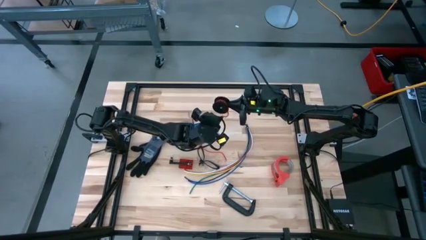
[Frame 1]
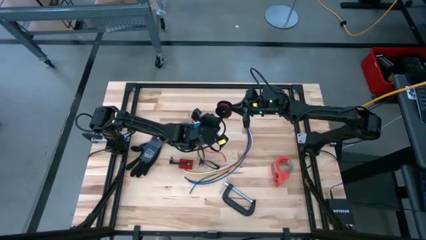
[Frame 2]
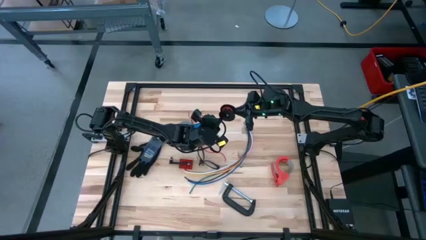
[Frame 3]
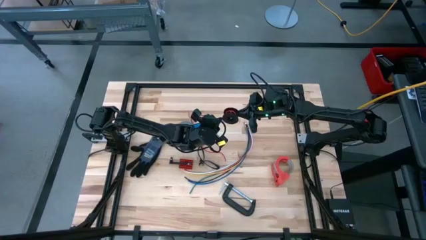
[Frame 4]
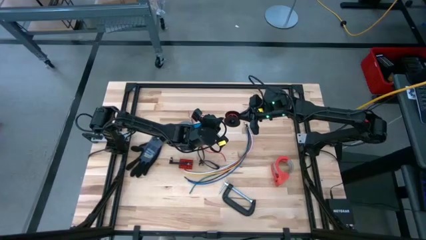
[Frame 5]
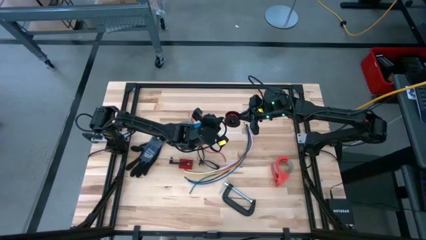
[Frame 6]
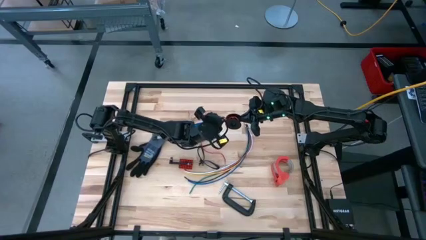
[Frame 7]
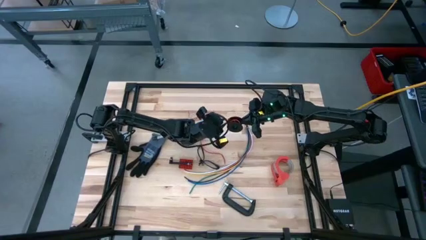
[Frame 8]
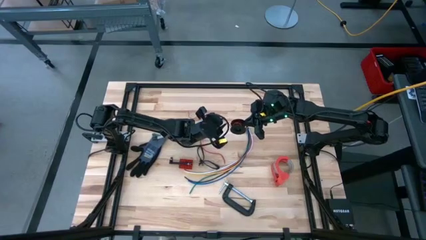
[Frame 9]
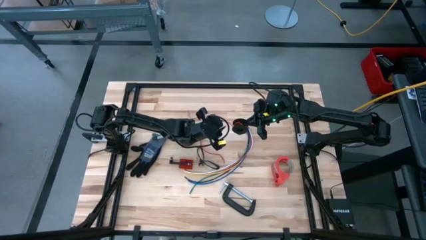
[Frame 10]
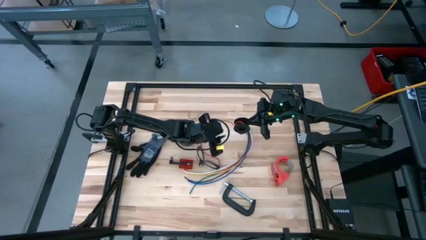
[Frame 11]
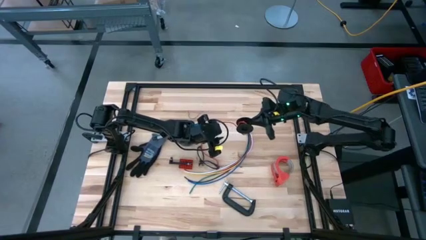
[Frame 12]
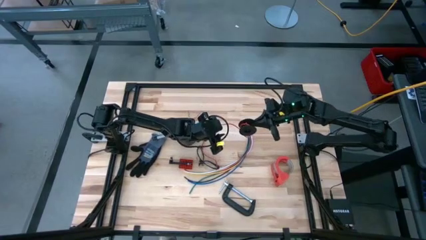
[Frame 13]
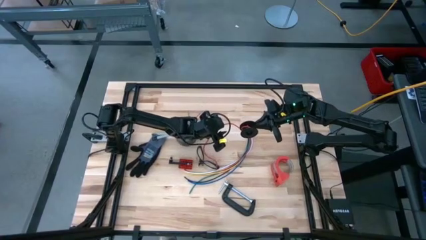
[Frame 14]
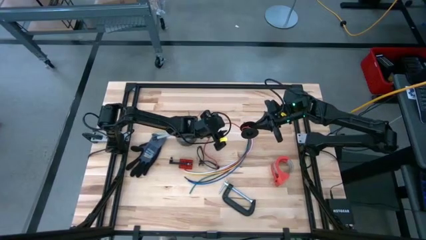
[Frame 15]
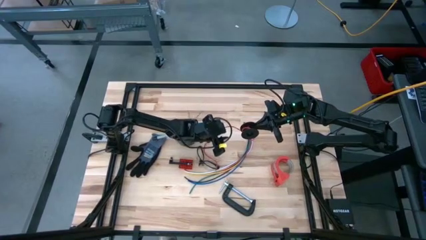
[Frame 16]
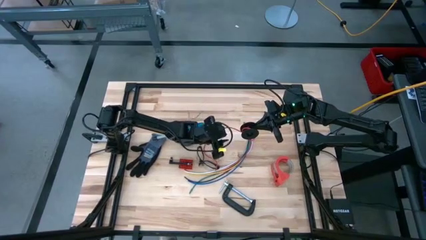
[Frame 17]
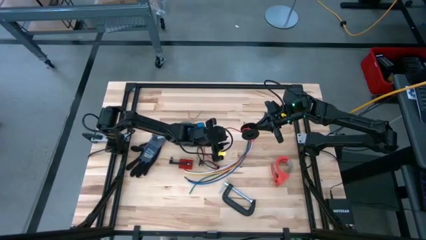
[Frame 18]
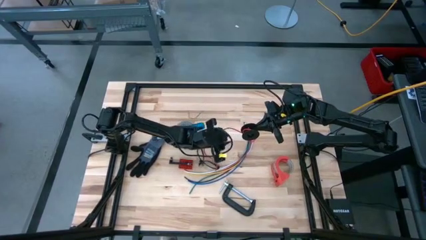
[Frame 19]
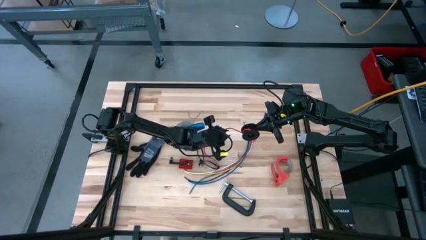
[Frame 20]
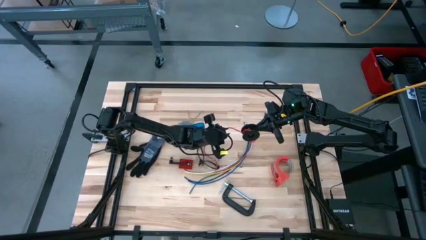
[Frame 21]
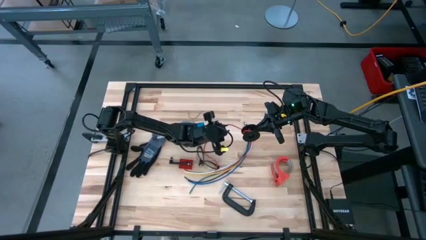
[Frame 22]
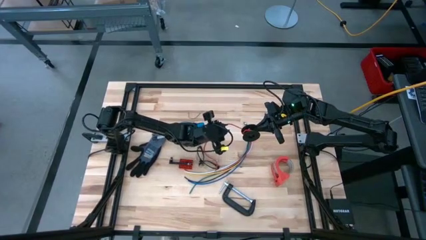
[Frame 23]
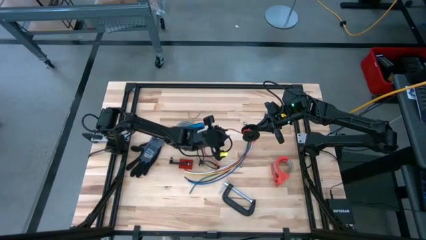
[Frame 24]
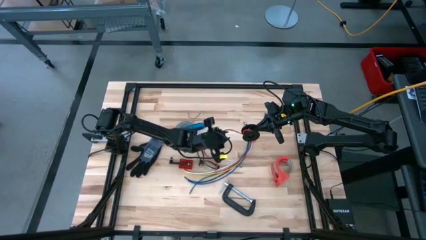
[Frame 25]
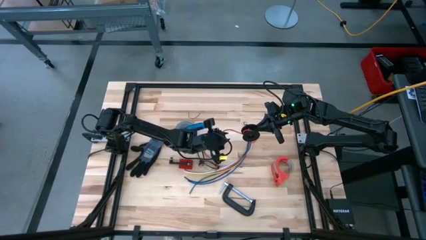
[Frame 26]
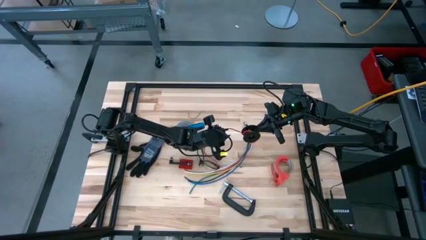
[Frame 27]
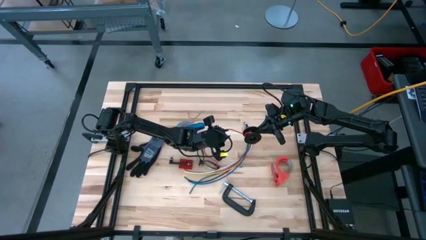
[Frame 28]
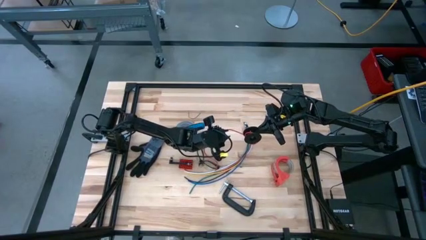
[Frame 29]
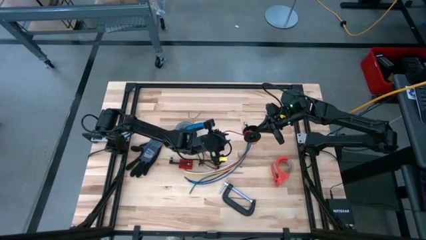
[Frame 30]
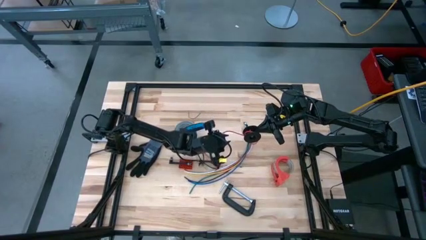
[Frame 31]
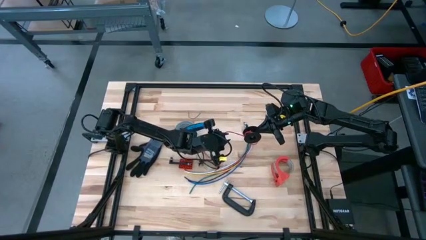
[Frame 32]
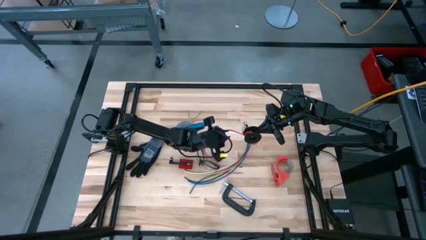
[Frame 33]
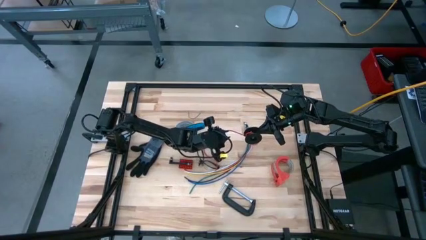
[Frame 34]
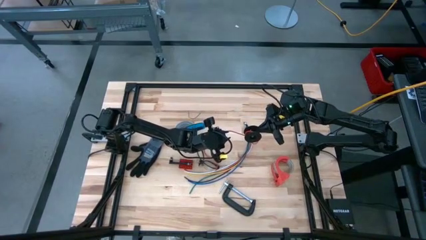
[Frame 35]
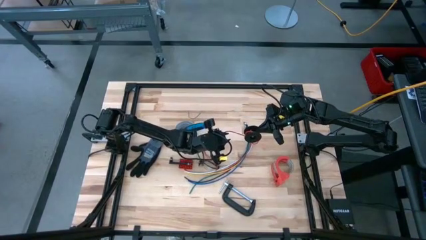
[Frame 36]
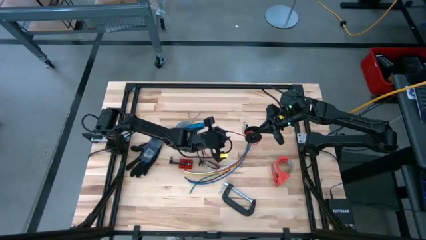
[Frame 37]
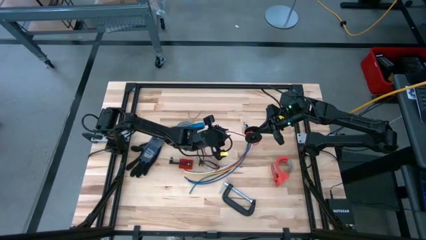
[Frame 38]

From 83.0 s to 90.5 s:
Task: Coil cords
Coil the red wire onto the black spool

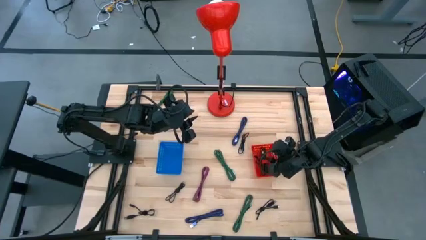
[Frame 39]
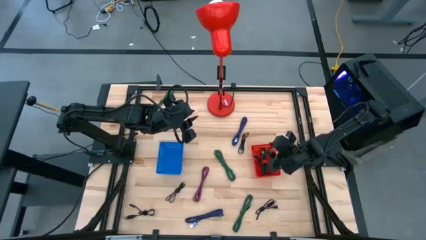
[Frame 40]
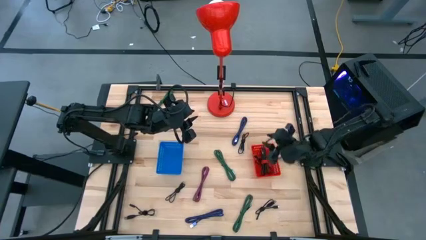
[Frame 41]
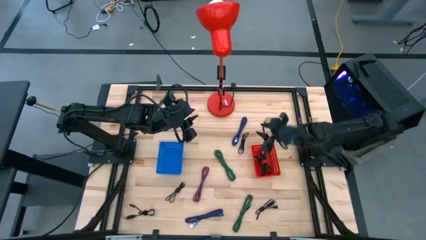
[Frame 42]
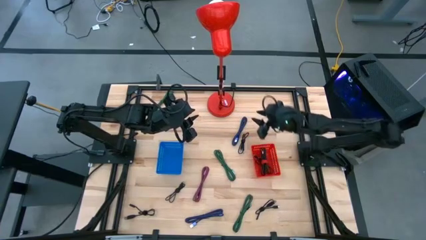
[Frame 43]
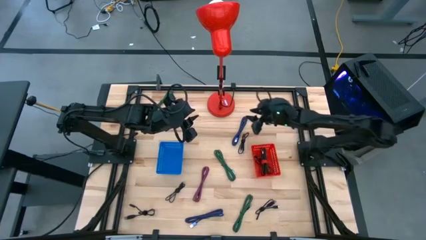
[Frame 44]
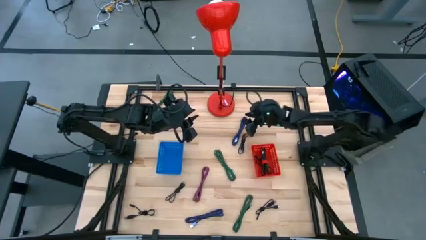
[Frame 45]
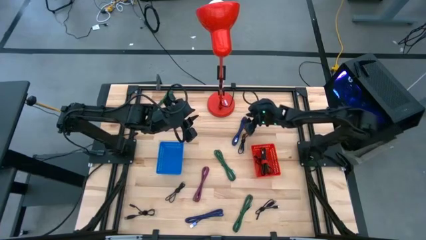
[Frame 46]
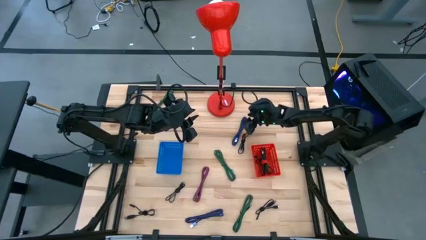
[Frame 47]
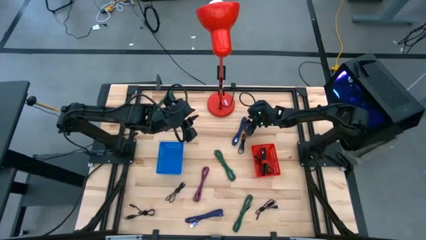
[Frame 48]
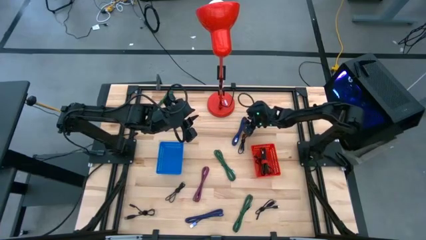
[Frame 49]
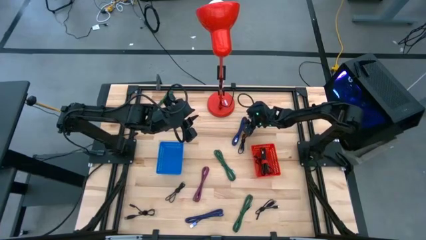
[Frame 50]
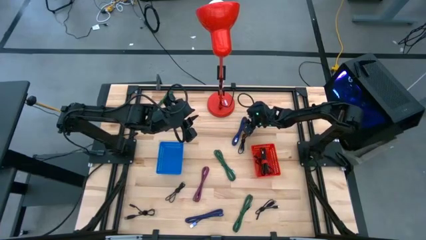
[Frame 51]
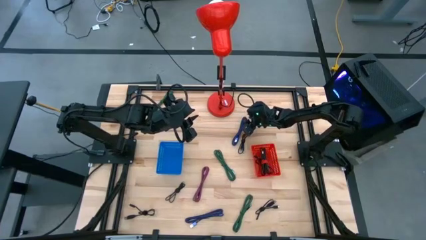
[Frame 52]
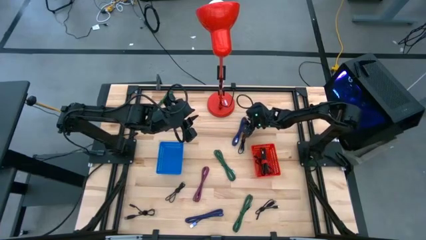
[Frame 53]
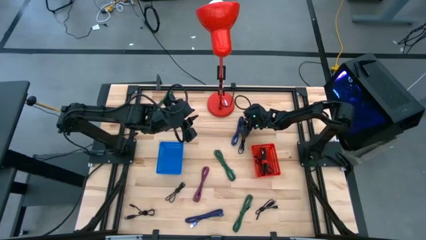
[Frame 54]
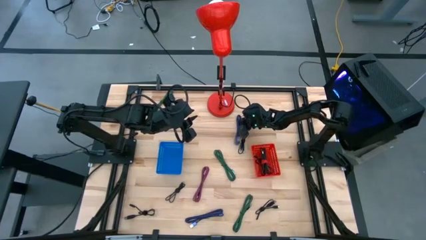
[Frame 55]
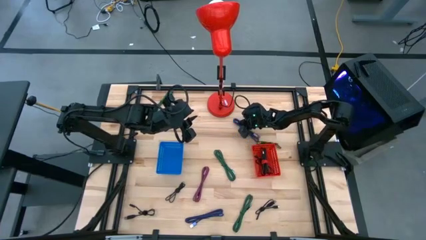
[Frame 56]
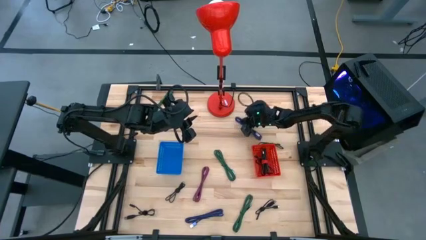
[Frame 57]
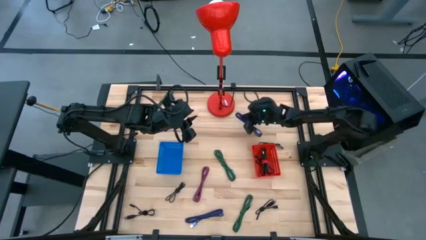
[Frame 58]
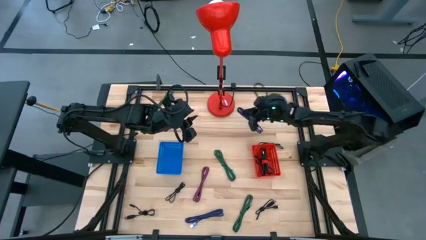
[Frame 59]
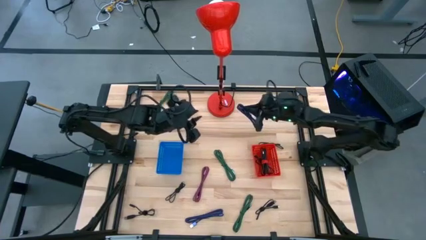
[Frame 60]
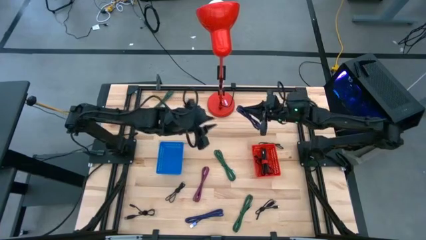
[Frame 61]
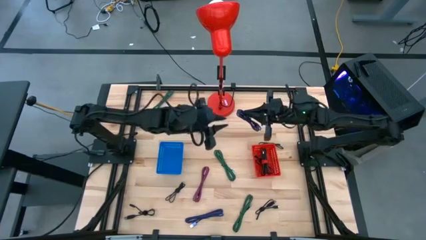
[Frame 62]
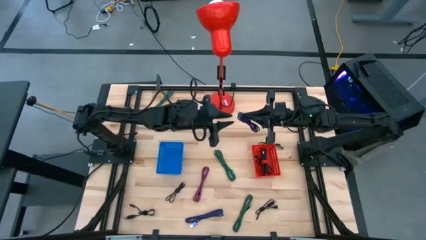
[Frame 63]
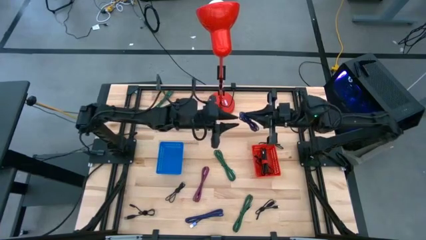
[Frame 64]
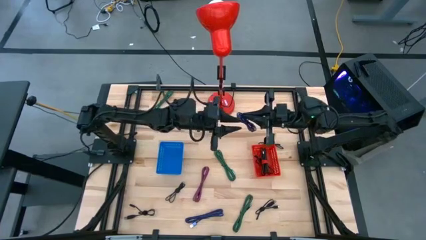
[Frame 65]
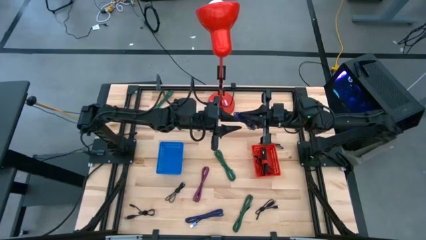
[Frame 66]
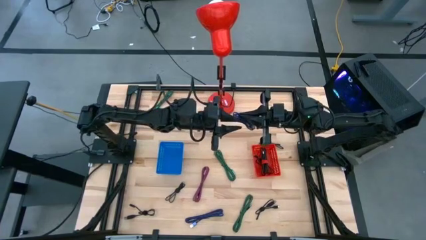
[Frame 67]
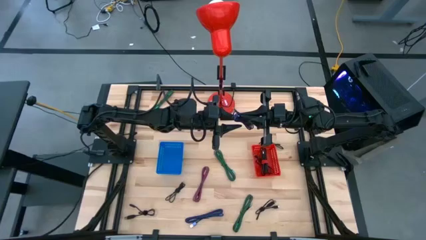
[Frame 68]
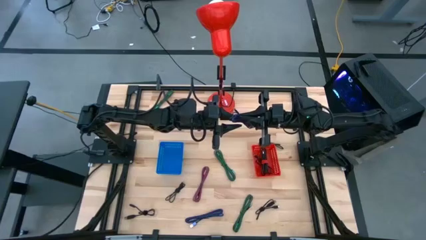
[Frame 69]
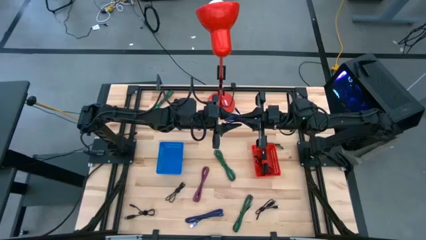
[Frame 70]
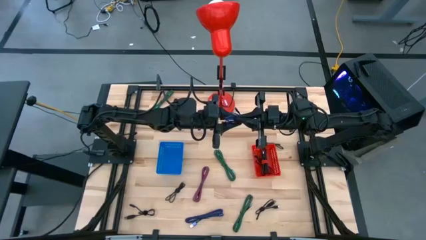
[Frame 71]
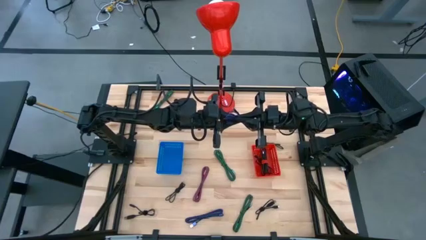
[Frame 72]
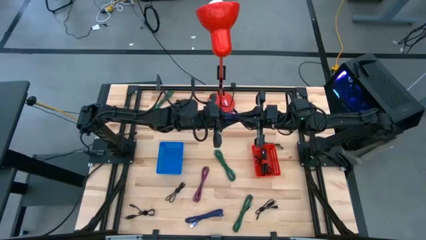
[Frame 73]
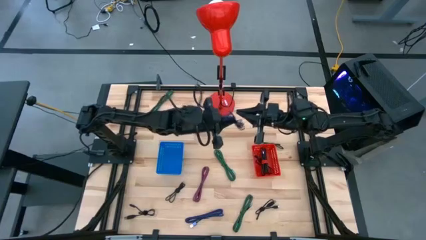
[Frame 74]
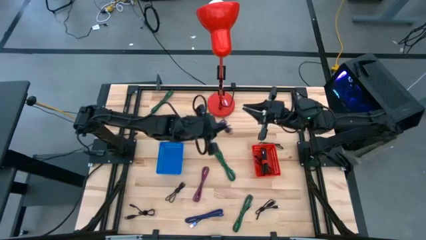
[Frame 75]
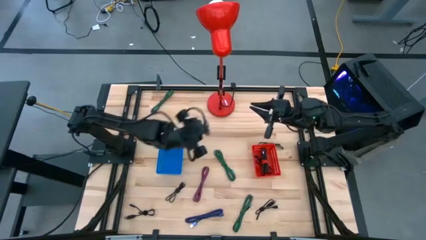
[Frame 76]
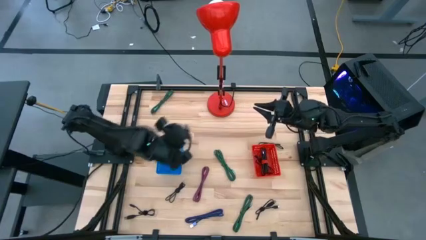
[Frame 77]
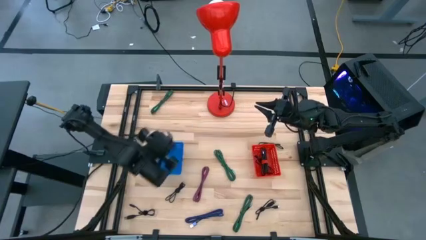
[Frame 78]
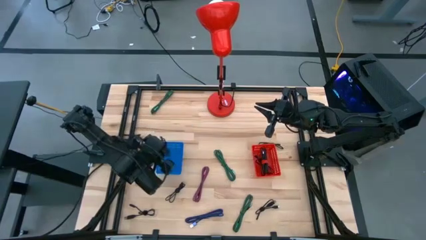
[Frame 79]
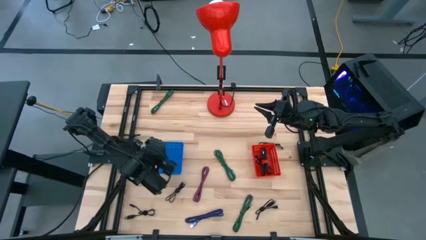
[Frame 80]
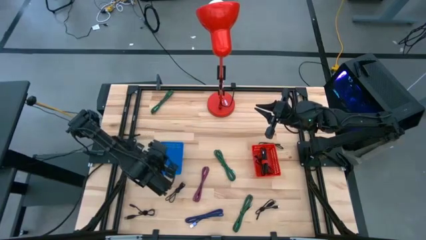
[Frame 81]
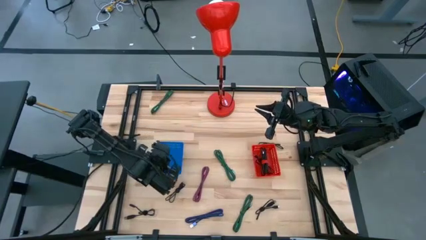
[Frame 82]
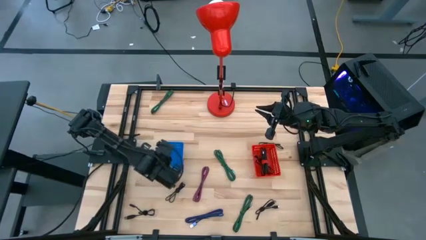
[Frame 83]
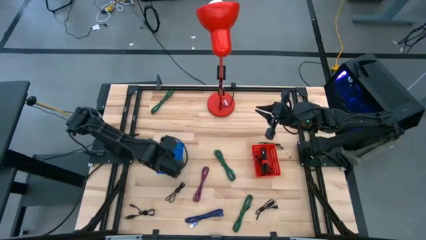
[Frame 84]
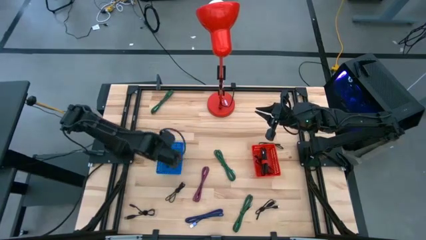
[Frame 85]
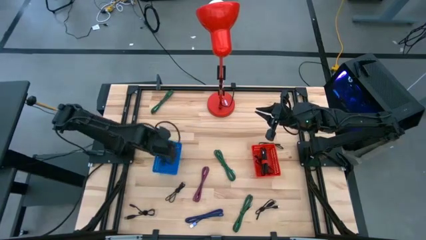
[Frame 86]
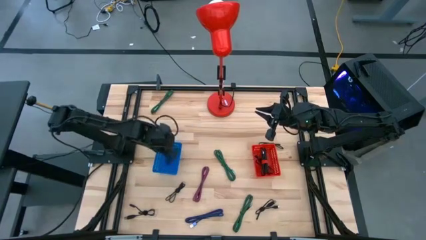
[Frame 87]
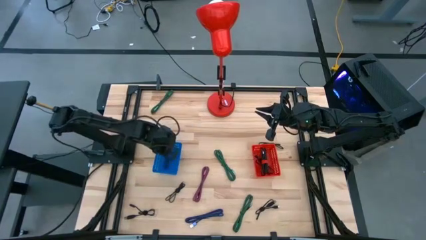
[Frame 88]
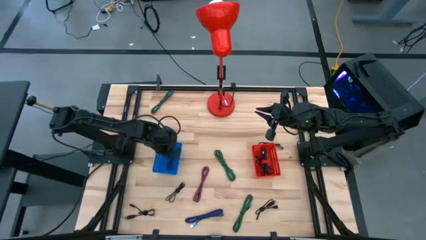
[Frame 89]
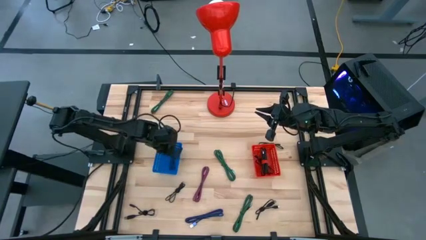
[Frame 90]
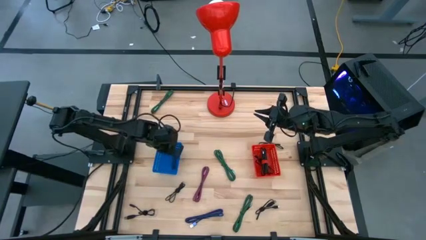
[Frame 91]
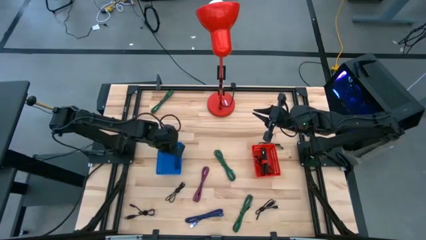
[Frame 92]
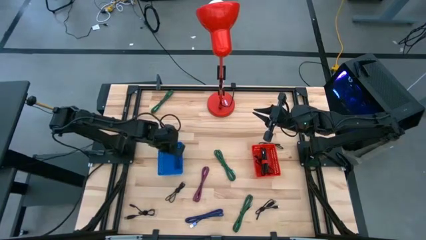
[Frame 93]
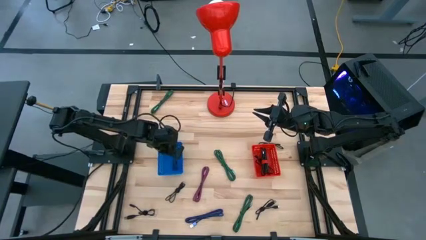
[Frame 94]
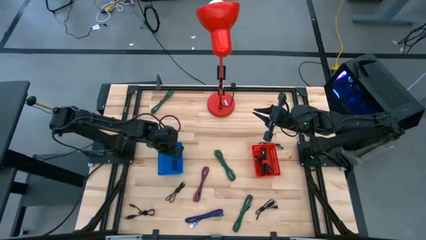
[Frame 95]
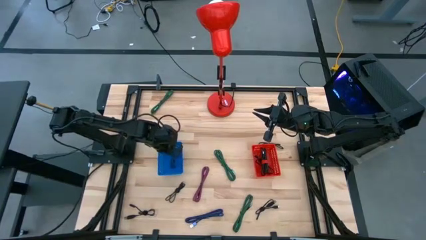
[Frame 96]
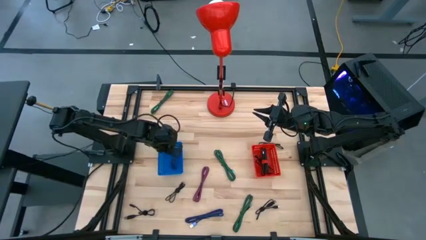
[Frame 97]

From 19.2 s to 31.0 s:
Task: Pick & Place USB Port
Put the blue and black charger cable into the blue bin
